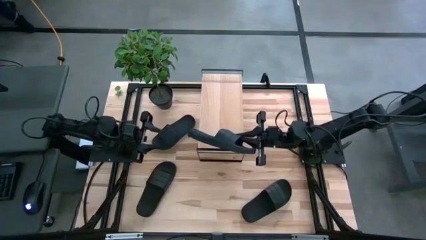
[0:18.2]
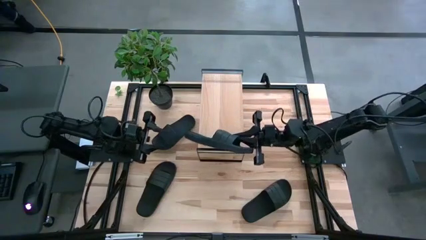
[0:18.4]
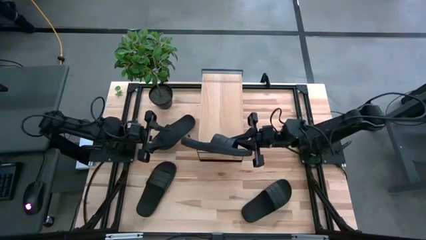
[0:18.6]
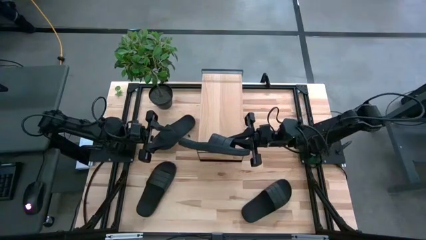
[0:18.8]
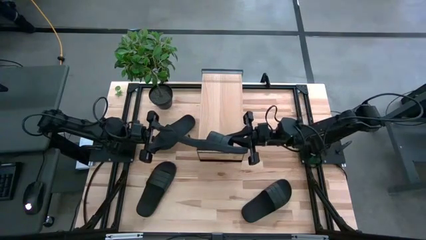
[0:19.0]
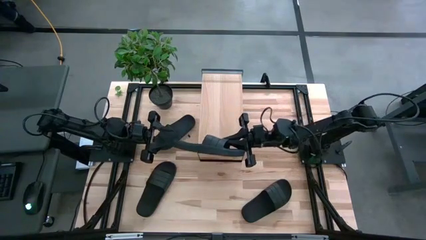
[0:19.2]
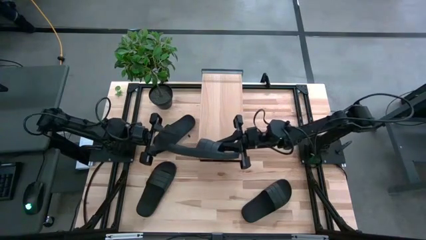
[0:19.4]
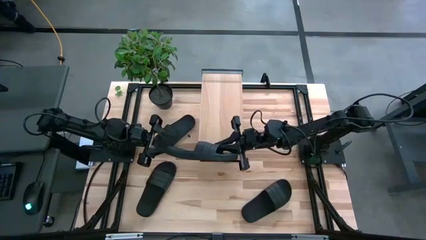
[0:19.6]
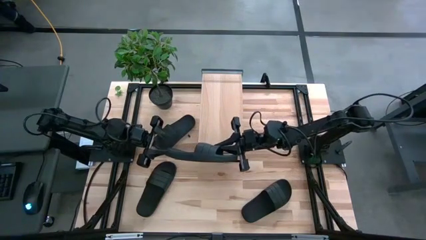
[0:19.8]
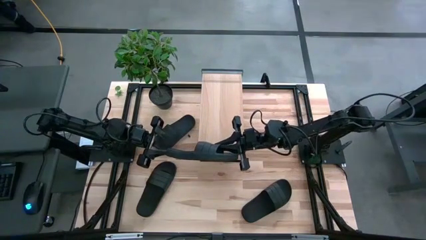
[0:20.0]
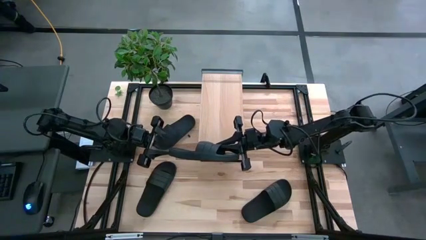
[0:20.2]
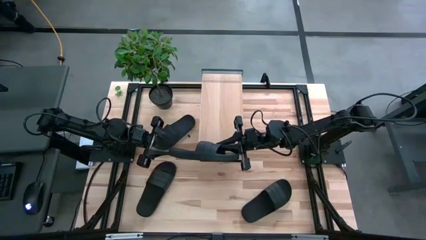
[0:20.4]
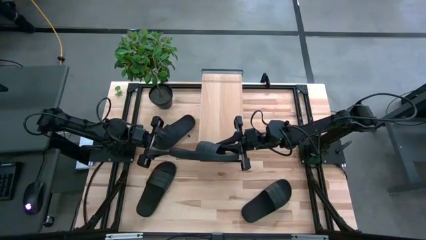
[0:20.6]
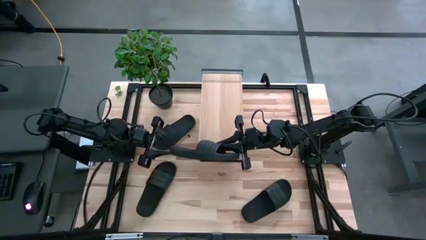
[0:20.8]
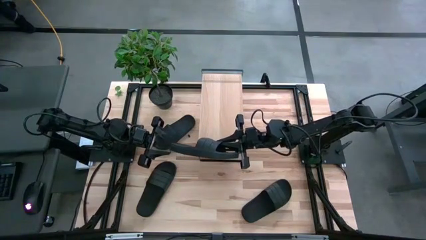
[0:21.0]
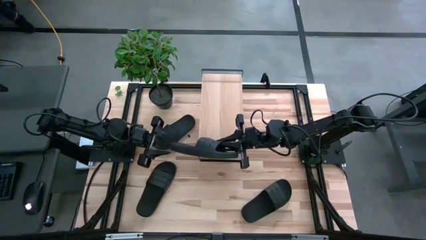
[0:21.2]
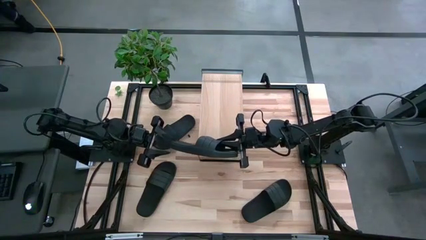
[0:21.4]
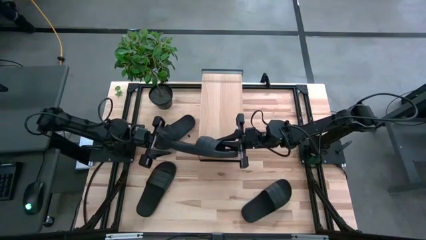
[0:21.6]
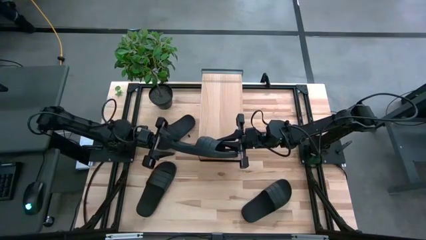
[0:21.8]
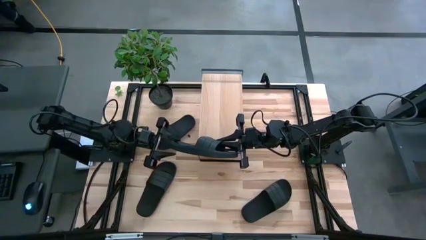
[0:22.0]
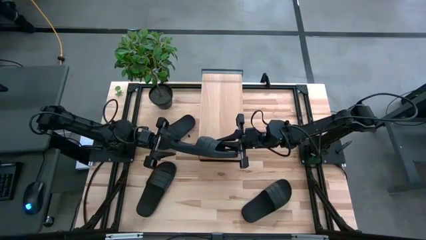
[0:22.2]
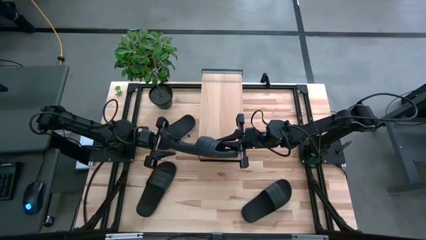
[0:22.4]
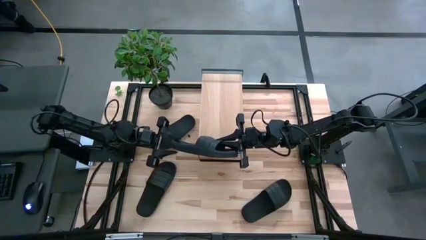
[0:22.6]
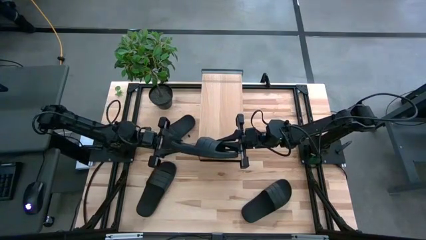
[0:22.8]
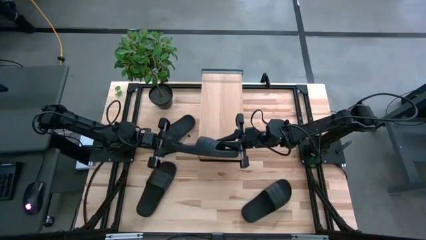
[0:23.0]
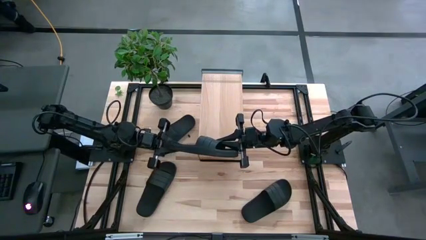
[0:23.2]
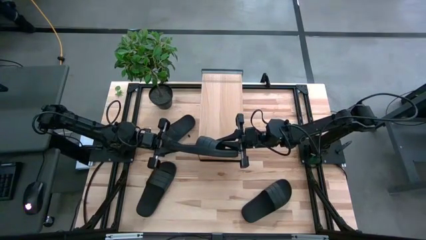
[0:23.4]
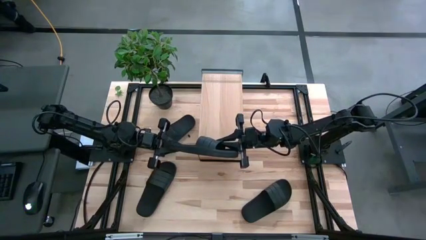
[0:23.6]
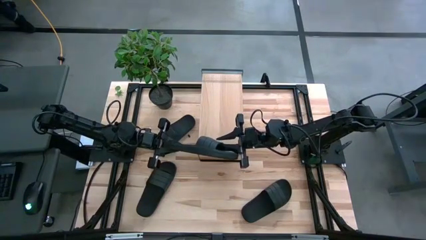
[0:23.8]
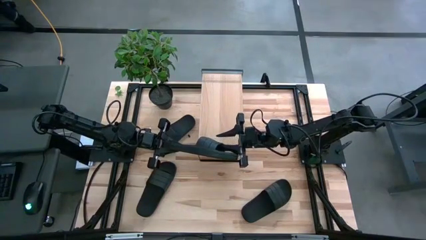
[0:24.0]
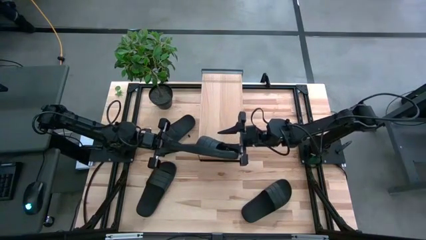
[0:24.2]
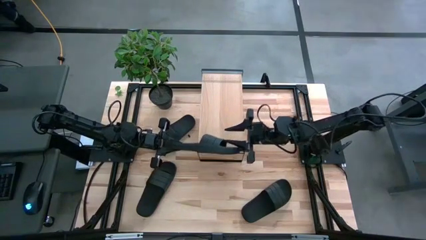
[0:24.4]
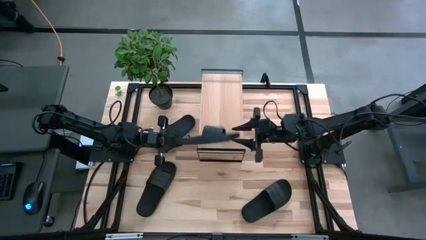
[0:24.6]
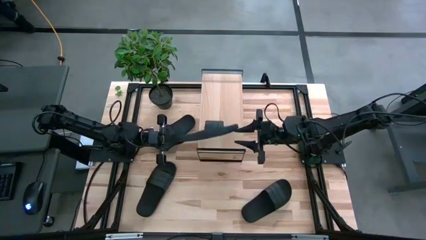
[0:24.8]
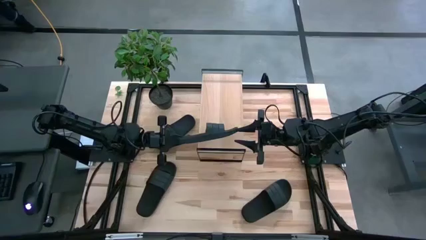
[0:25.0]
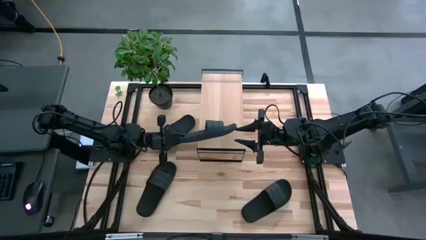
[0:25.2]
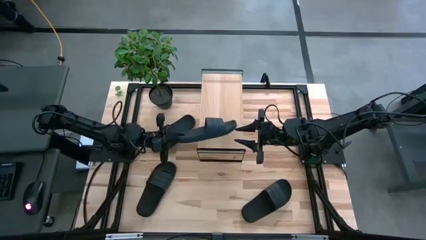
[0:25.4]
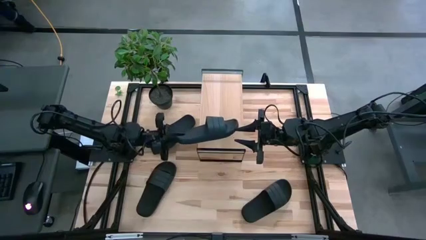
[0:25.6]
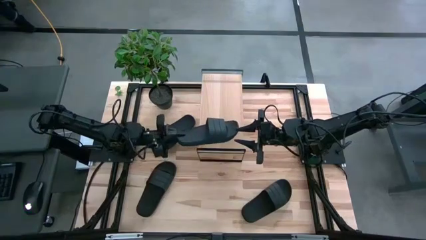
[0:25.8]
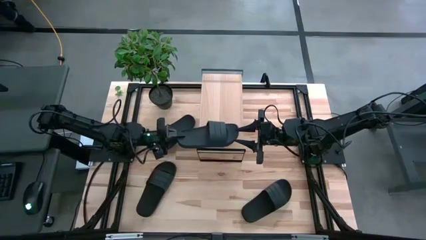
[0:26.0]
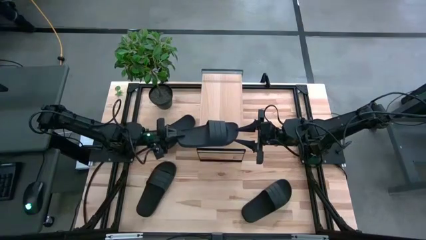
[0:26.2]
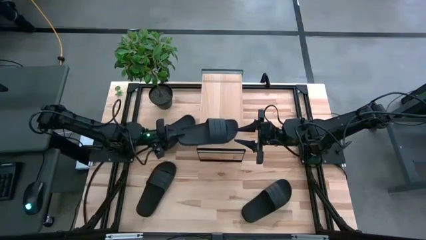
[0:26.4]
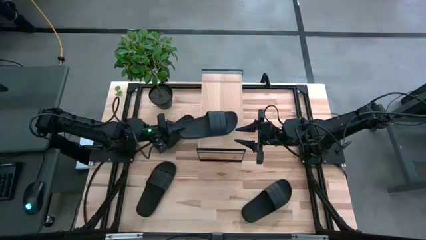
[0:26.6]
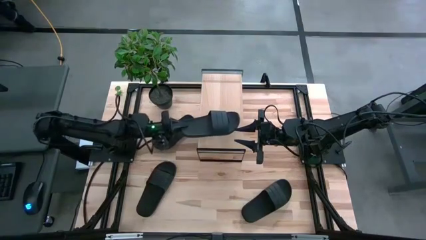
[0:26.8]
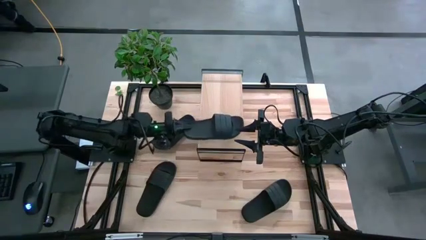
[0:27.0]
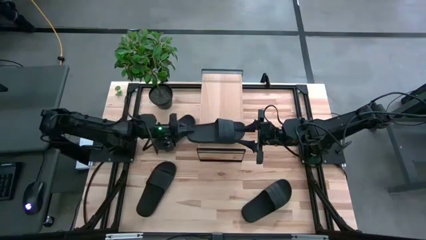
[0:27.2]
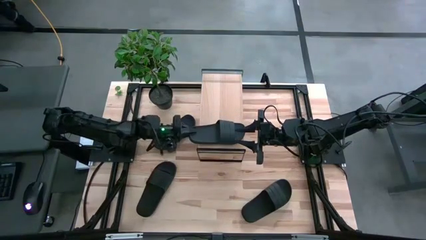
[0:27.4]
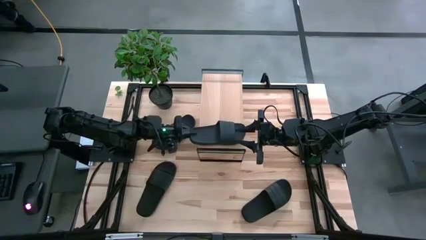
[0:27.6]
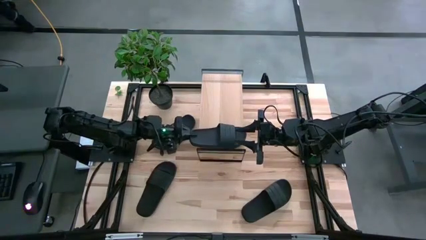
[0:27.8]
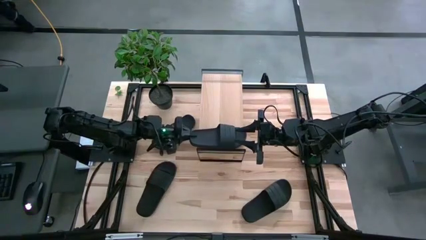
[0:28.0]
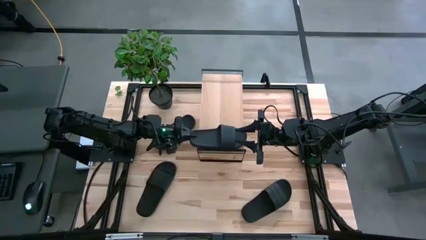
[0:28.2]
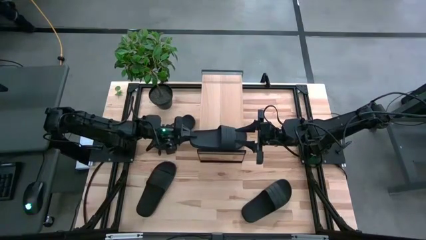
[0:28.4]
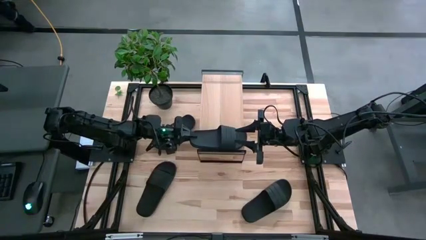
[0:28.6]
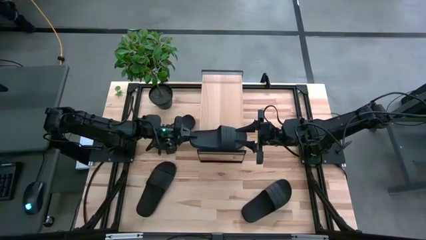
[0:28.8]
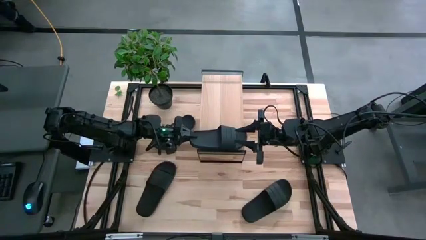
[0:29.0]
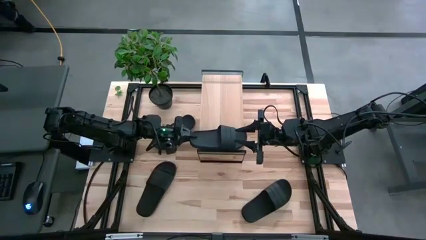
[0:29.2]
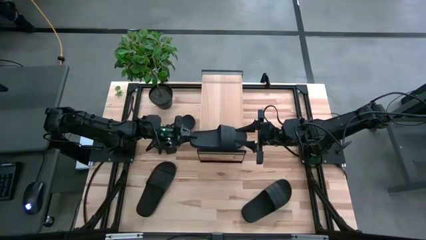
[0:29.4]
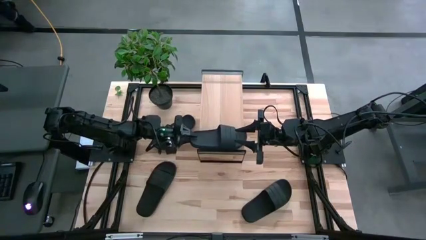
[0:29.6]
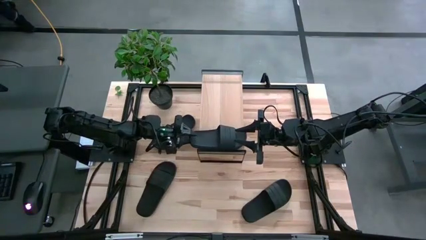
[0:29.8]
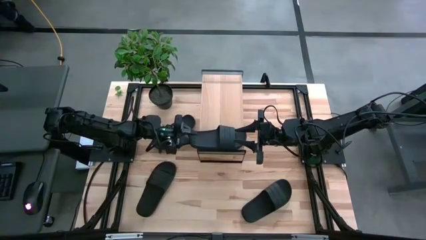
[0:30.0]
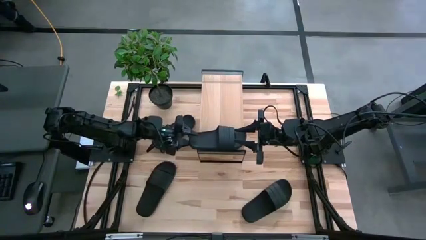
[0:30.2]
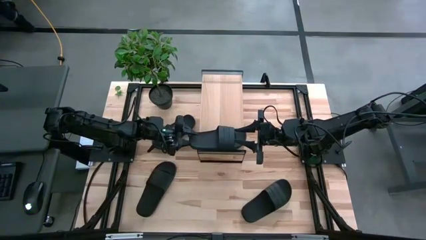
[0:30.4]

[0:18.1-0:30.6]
Task: Pick and place slides into the shelf
Put the top right black slipper on the shelf
